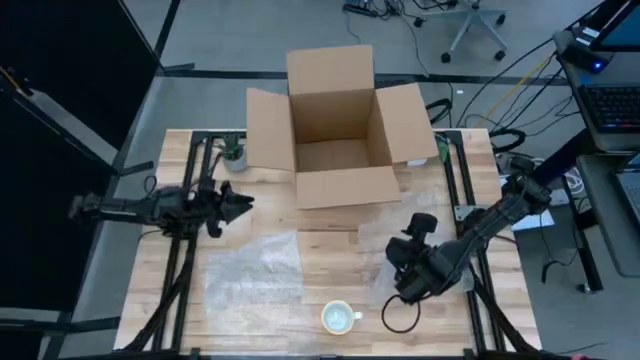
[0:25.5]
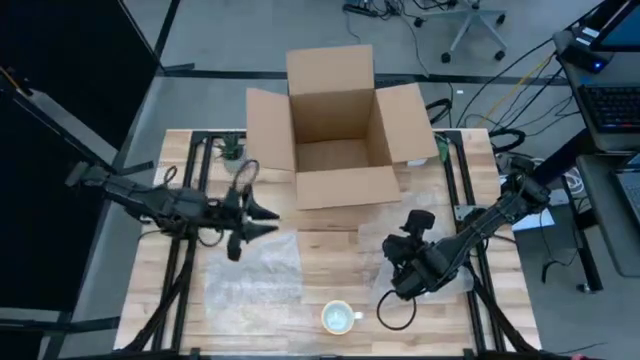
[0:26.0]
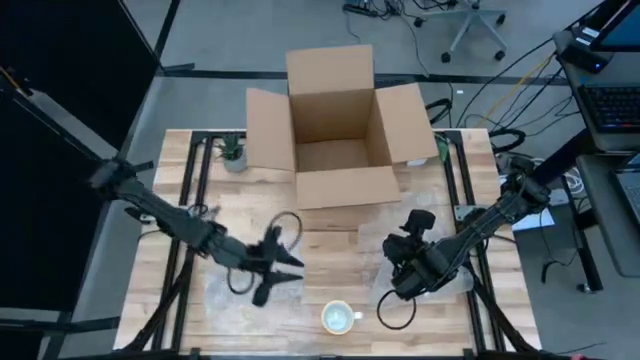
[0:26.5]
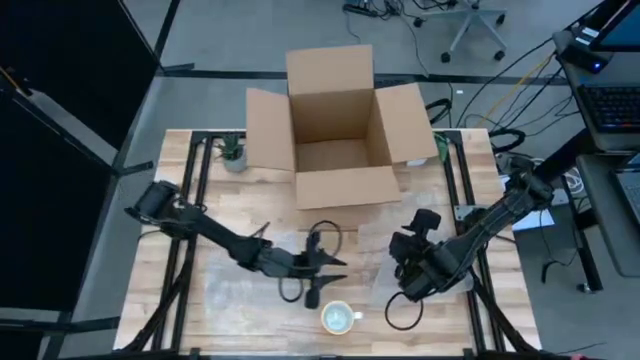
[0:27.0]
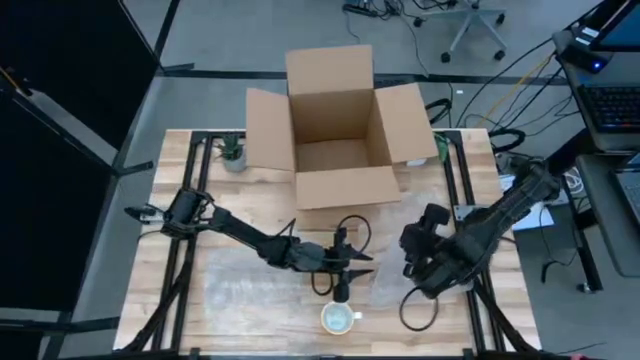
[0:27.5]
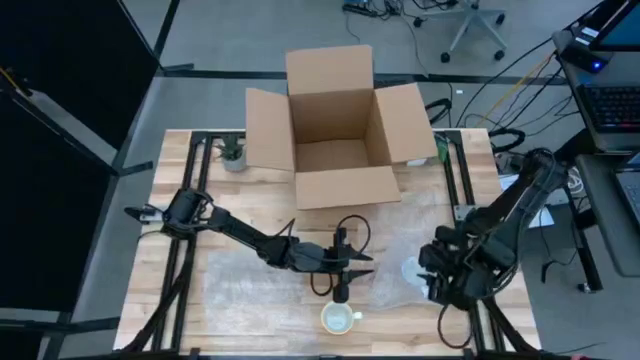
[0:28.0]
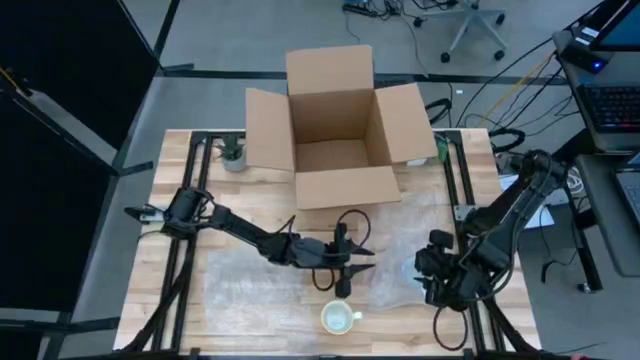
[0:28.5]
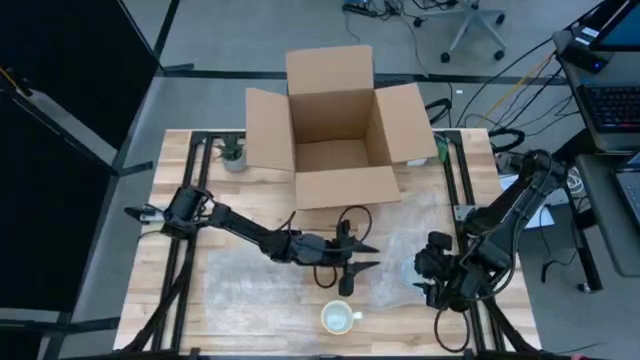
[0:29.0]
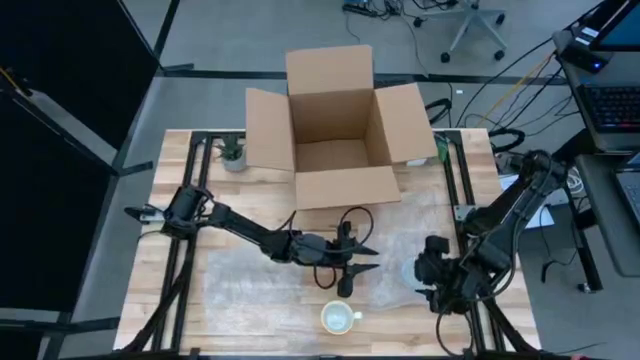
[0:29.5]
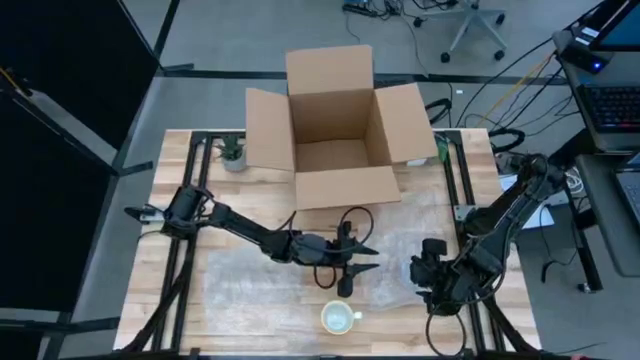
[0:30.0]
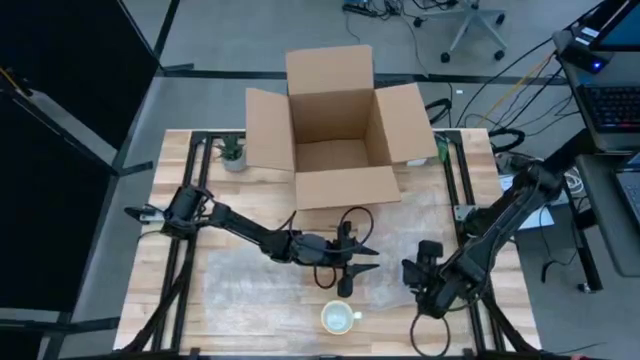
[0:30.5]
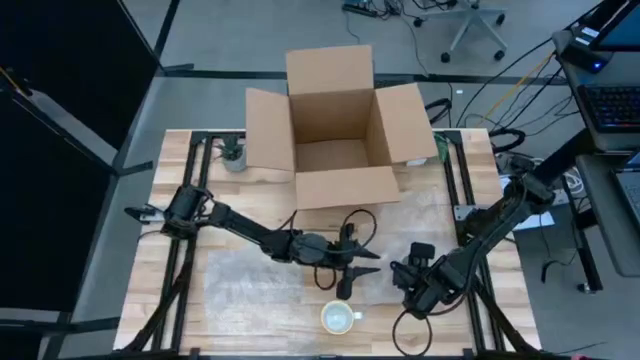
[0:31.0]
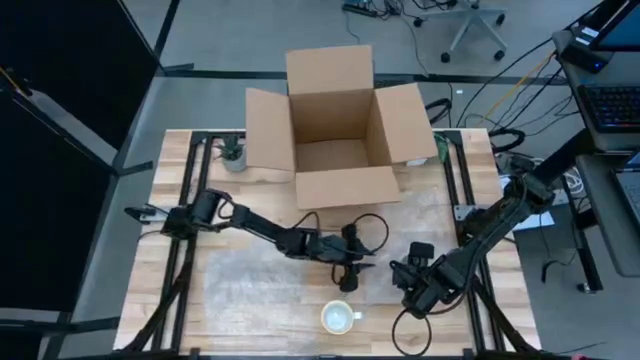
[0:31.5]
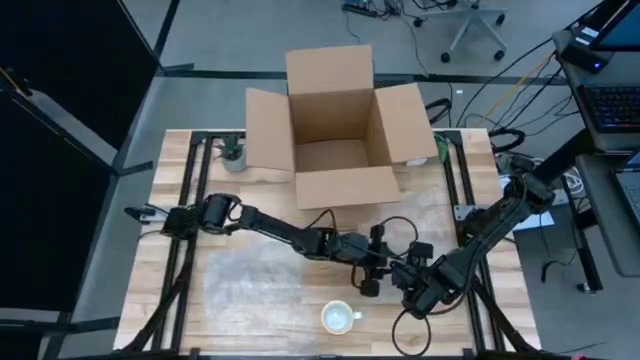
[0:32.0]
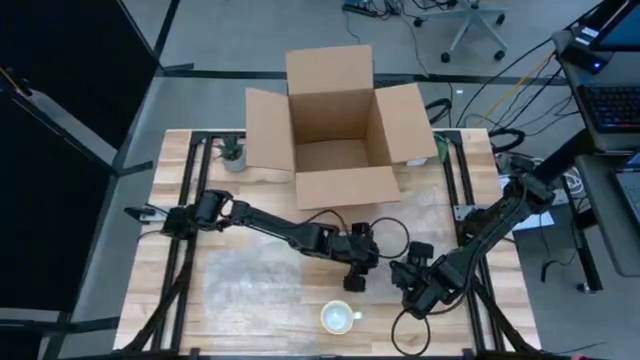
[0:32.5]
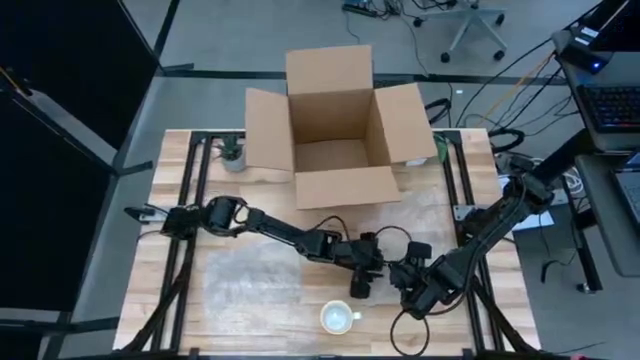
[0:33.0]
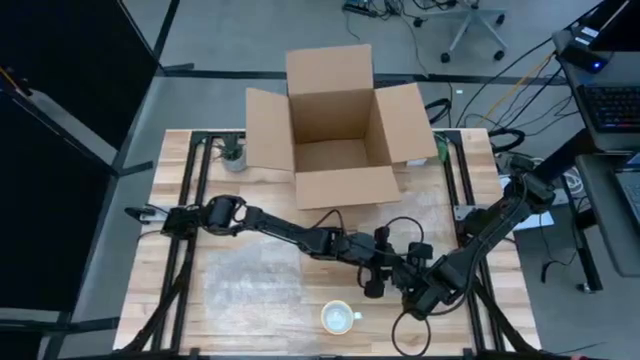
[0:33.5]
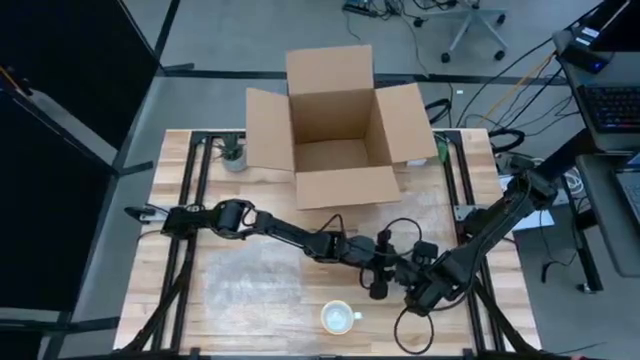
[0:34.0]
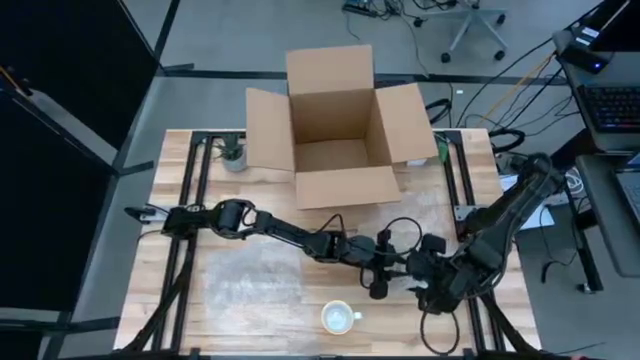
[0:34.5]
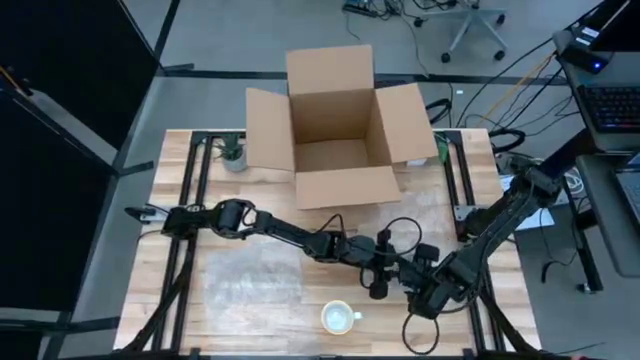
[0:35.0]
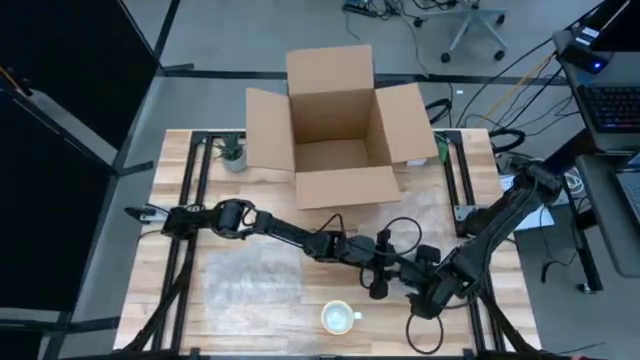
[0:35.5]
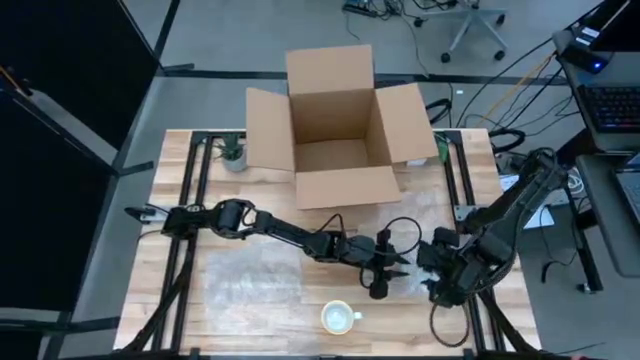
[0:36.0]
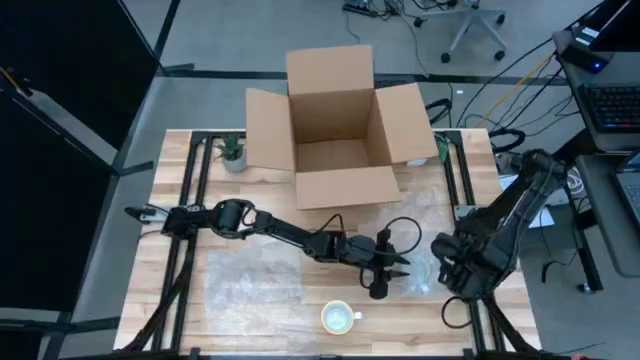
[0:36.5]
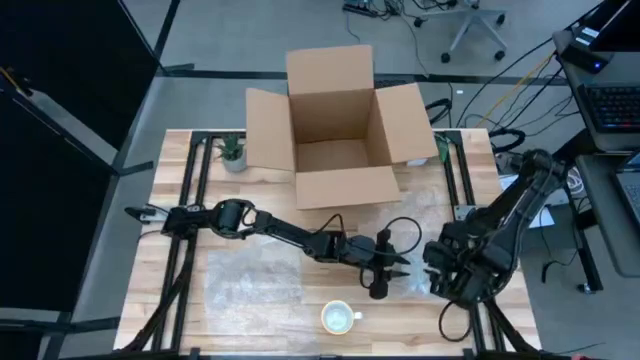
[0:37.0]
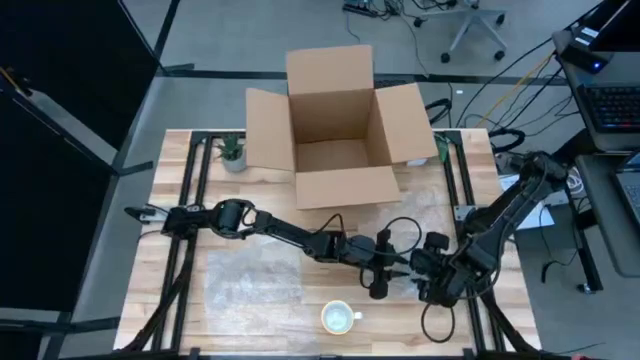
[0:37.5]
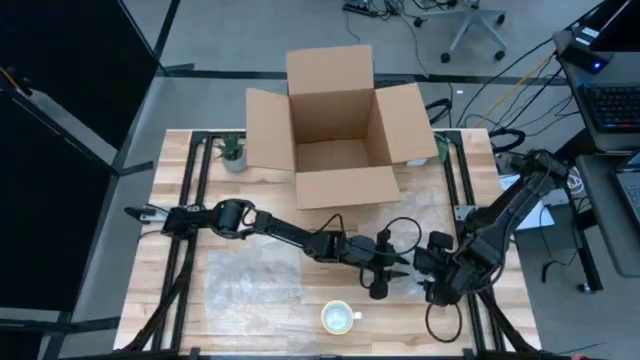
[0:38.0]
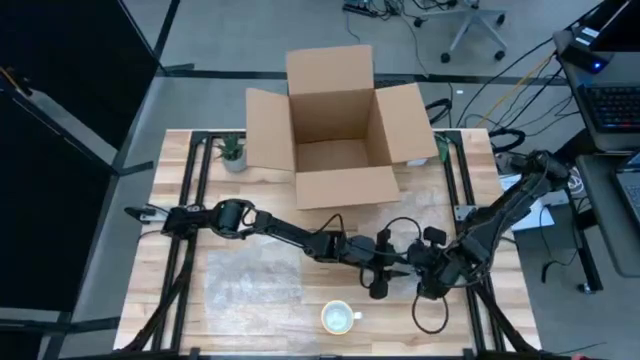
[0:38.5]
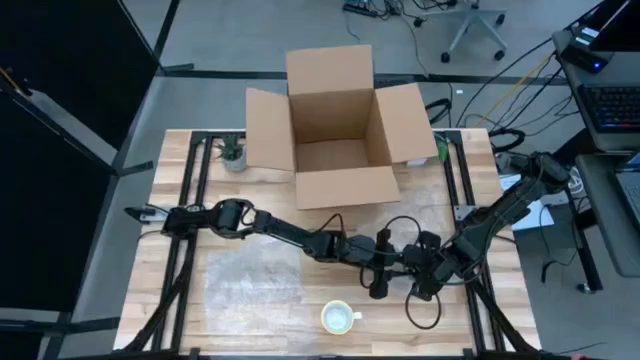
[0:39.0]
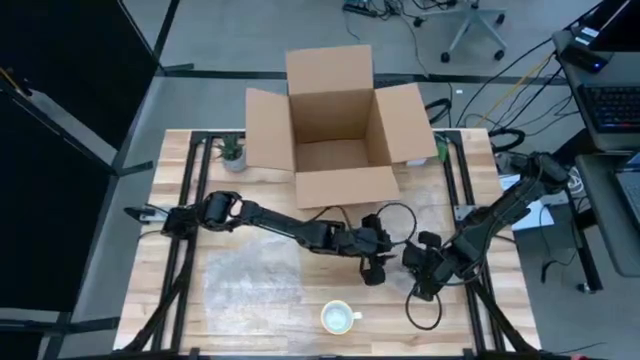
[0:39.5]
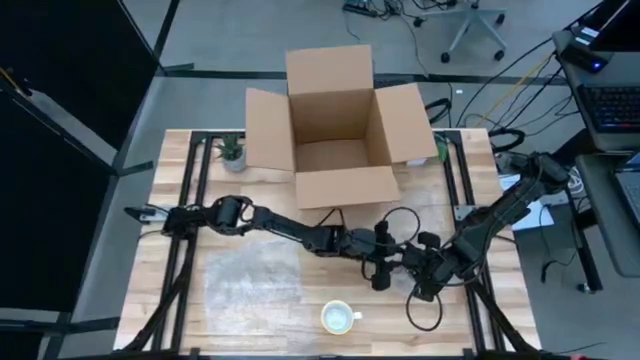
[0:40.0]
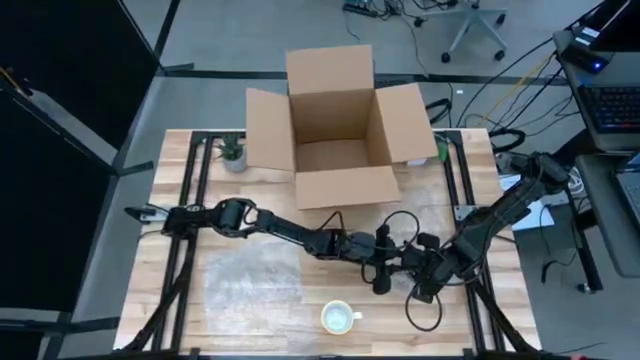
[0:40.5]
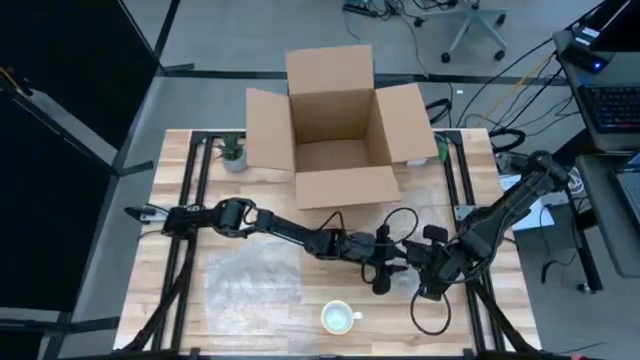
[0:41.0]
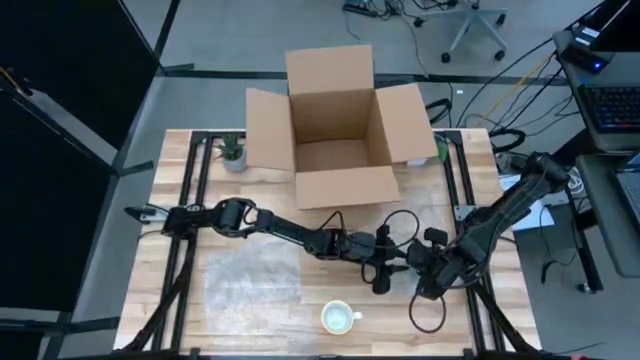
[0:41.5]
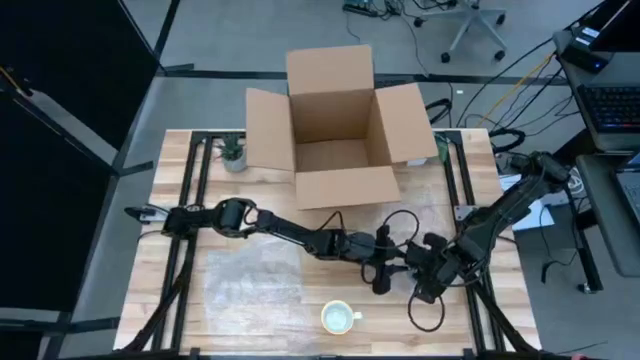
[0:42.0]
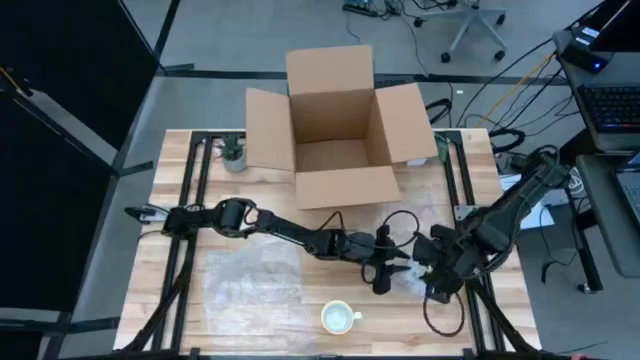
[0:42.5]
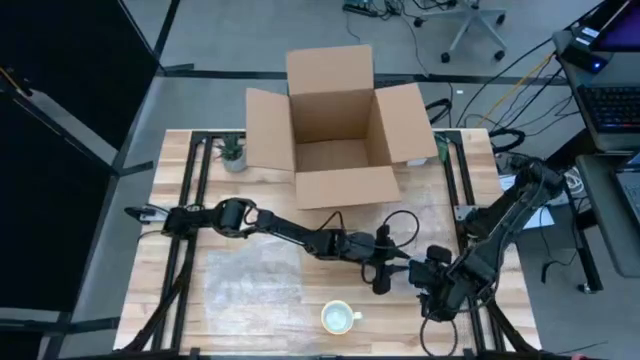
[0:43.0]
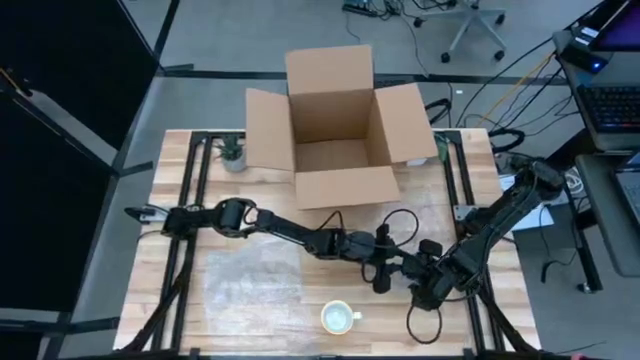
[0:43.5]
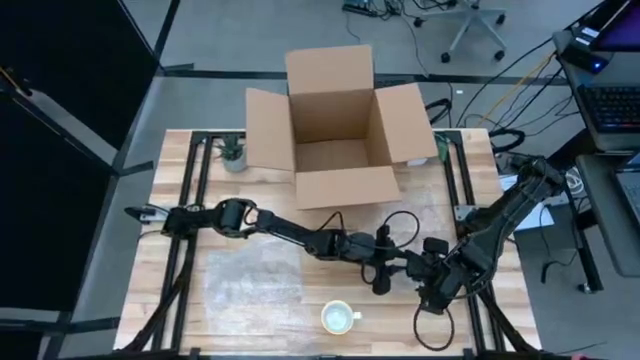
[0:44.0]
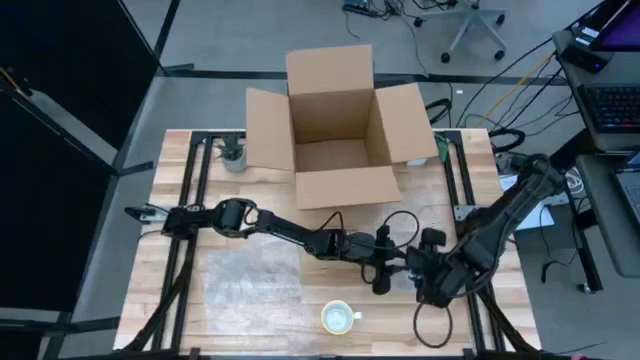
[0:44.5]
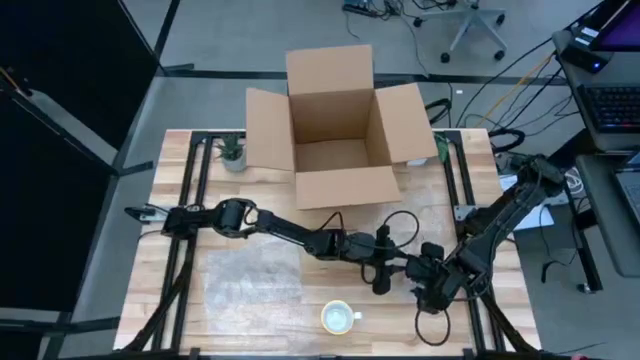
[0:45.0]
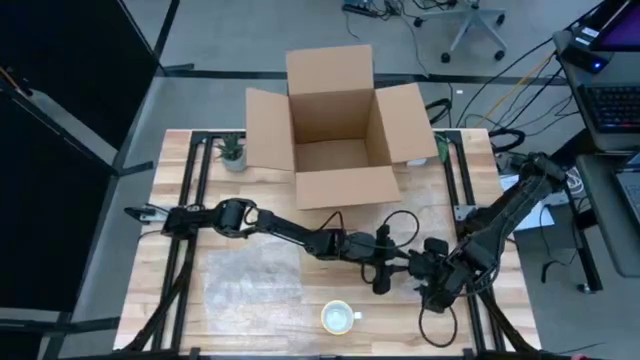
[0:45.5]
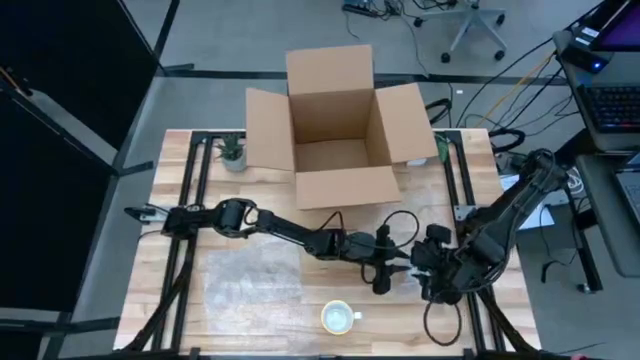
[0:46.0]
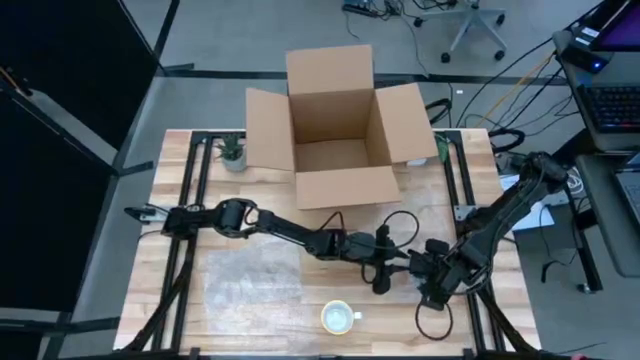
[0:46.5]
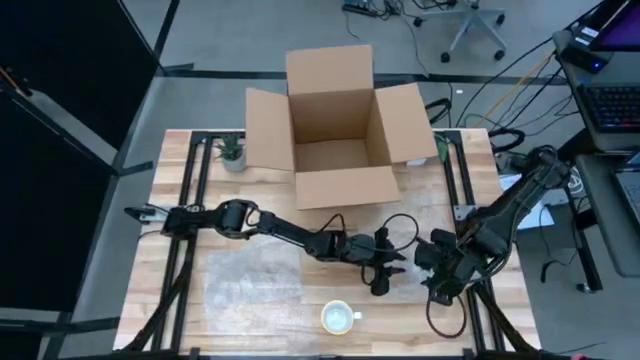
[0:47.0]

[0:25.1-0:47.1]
Task: wrap mug
Wrap the red mug with bubble wrap
